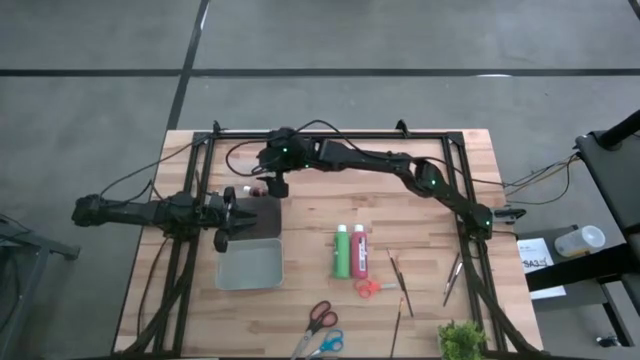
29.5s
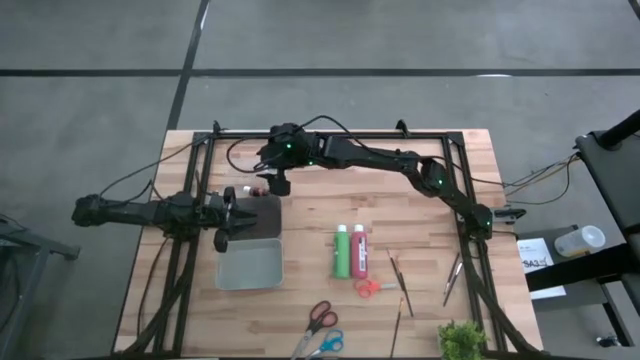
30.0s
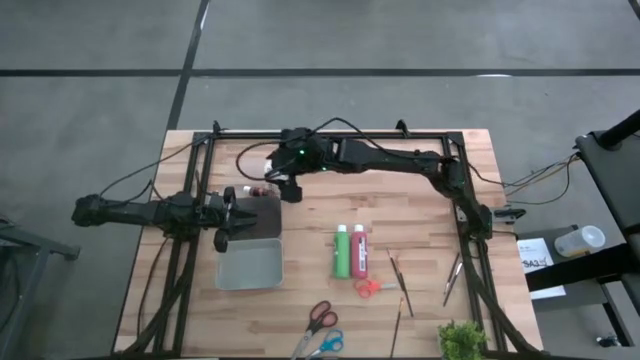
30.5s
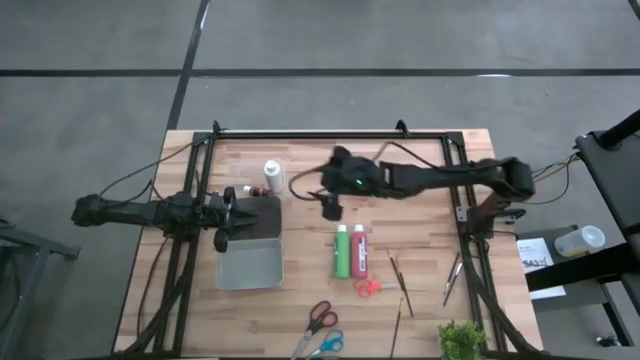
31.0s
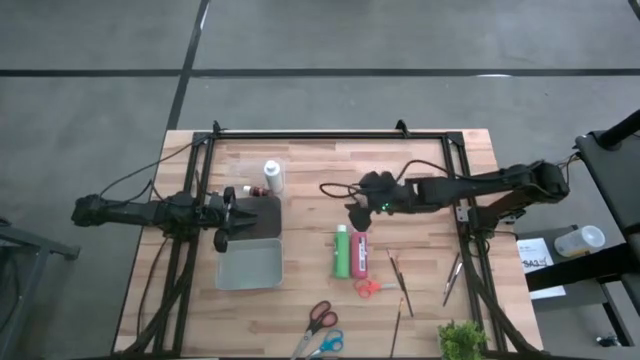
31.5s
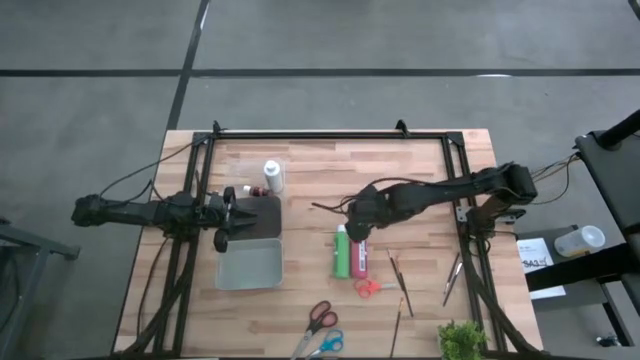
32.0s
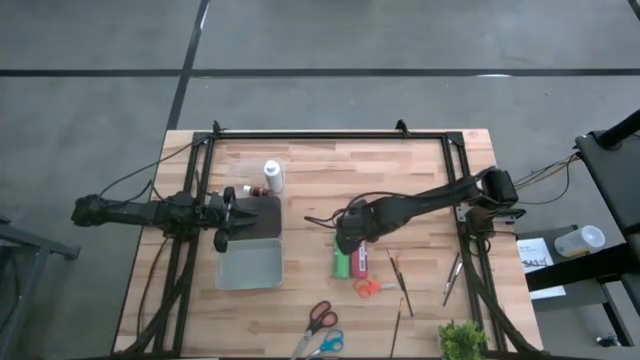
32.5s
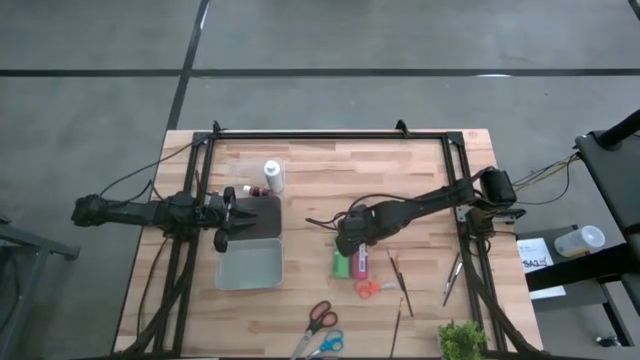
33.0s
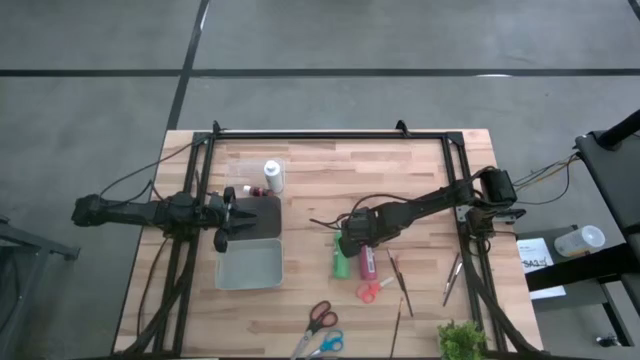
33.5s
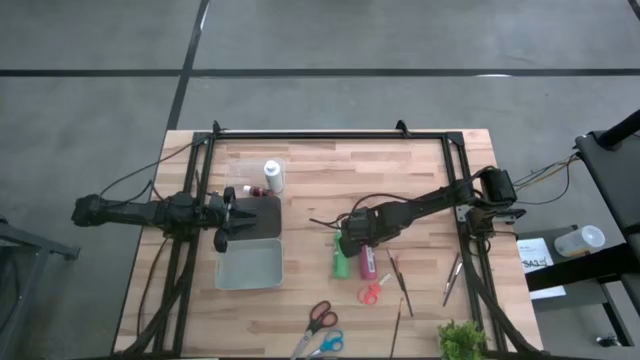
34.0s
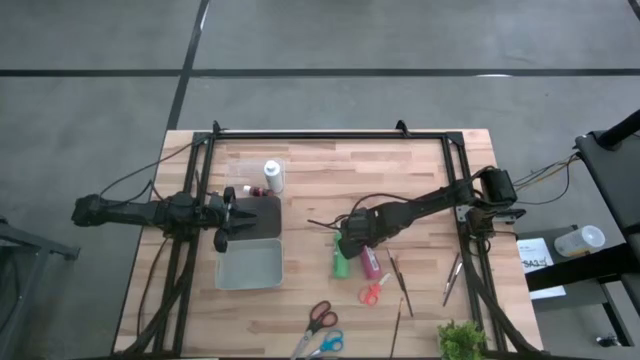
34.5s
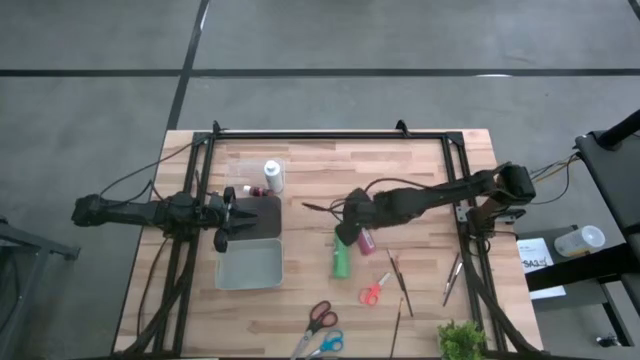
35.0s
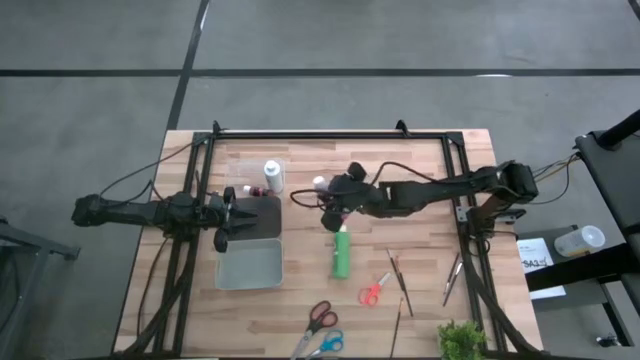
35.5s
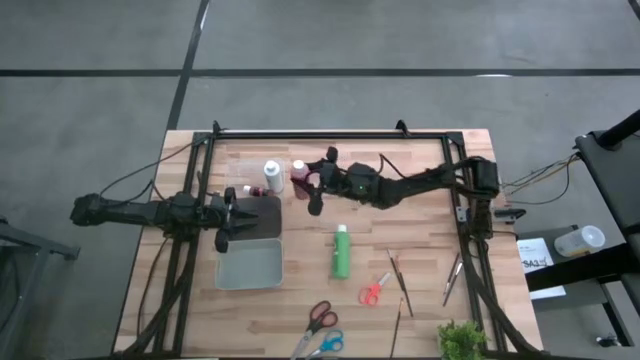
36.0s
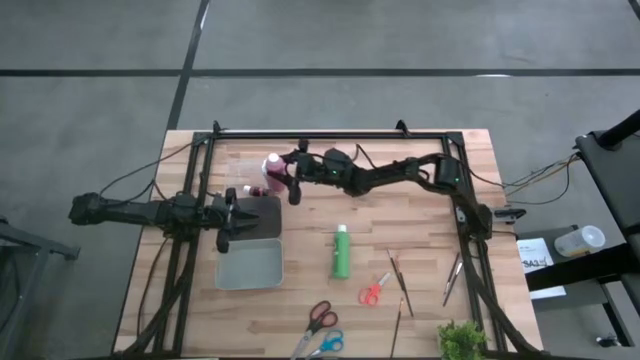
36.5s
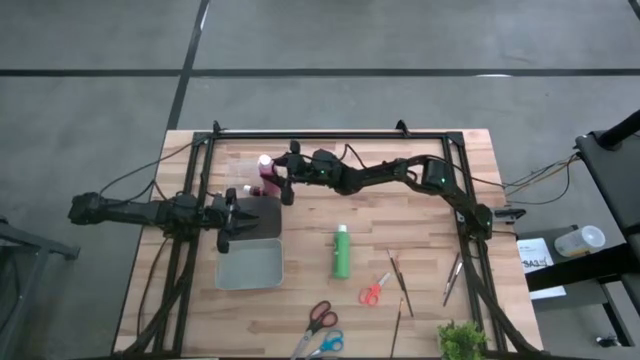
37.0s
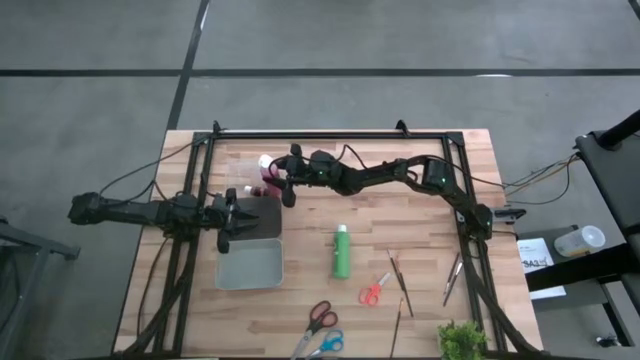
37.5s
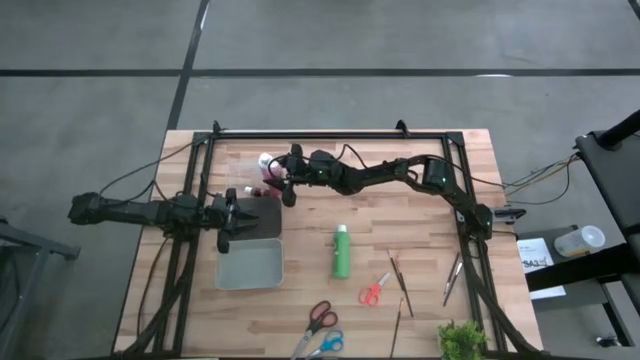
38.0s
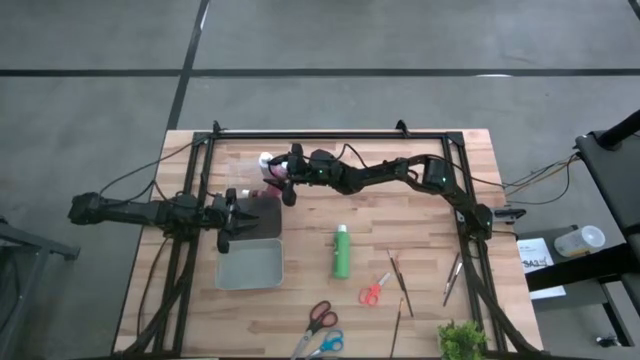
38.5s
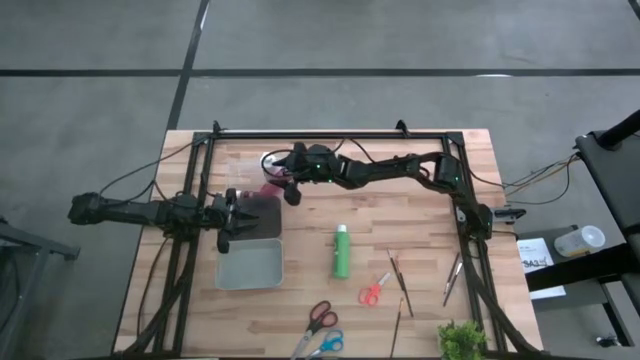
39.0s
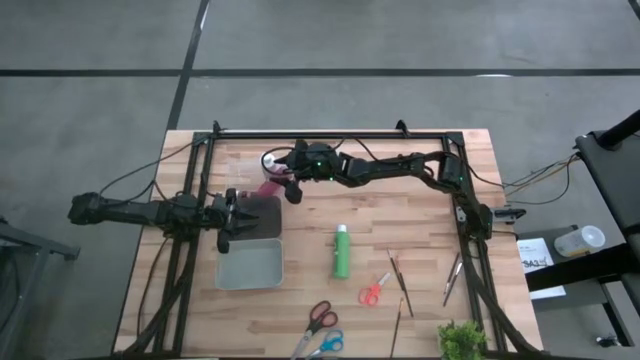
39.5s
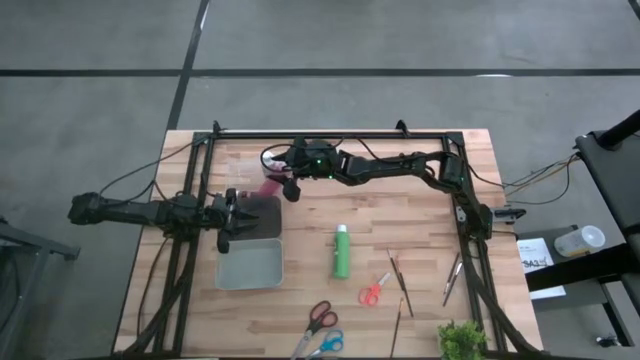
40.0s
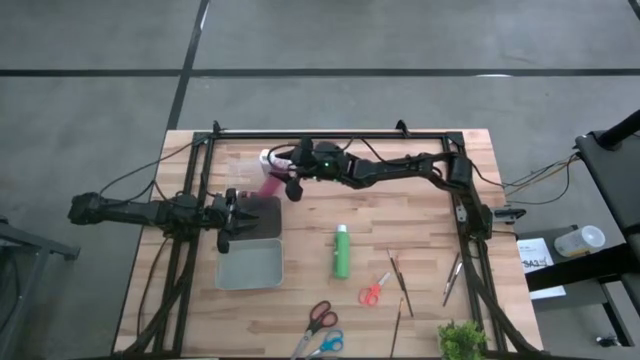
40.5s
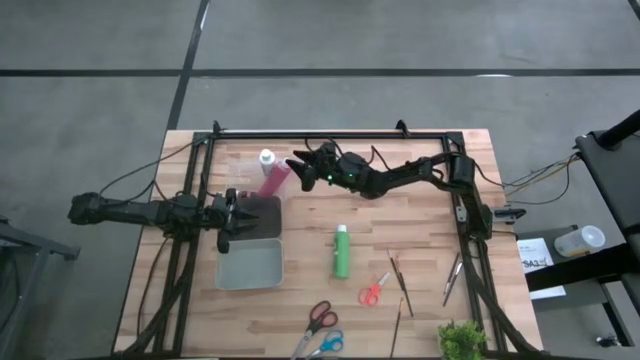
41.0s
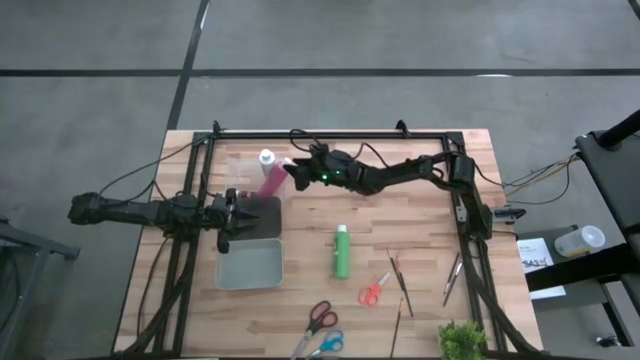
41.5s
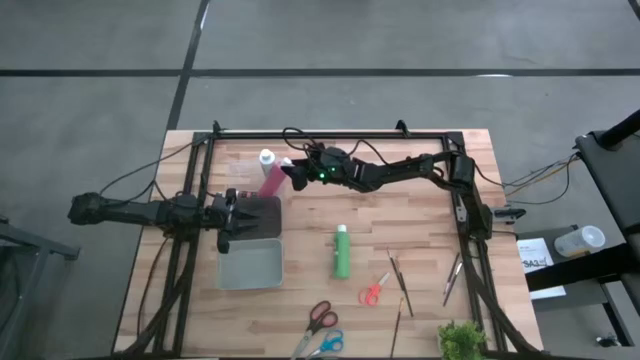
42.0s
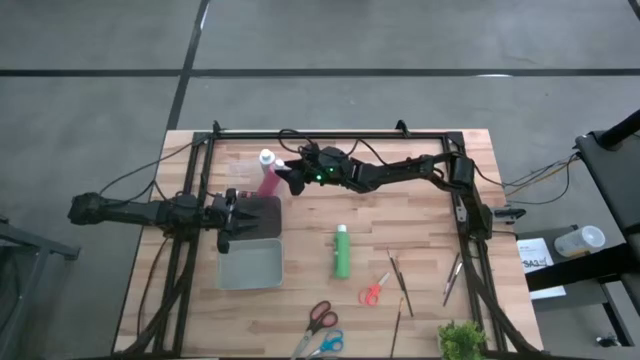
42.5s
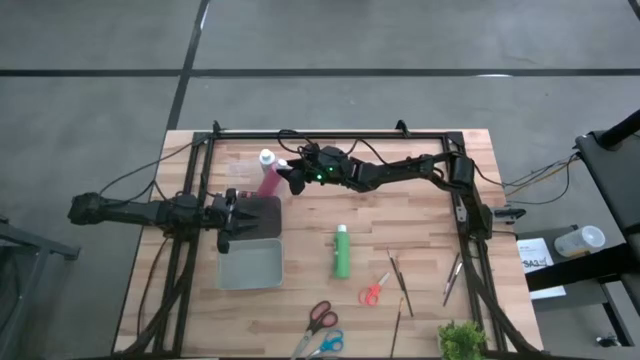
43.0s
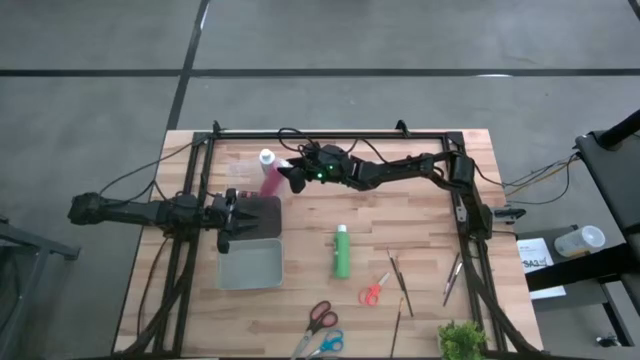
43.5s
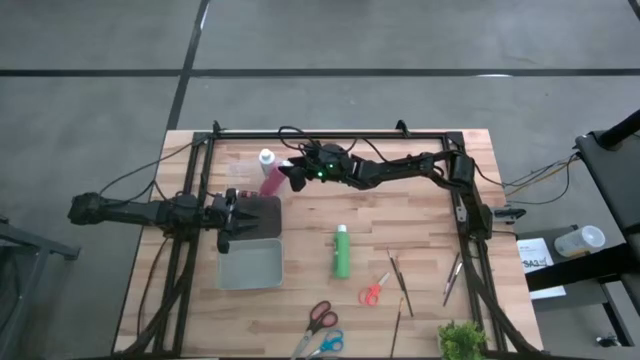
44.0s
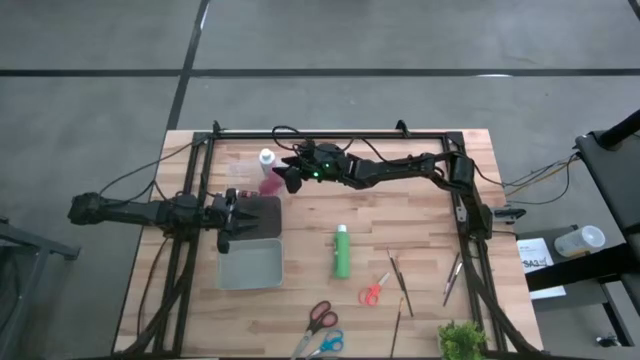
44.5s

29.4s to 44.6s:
Task: Pick & Place Paint Supplies
Put the pink paint bottle into the transparent bin

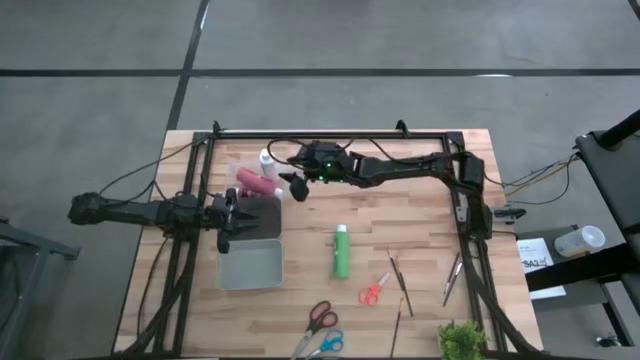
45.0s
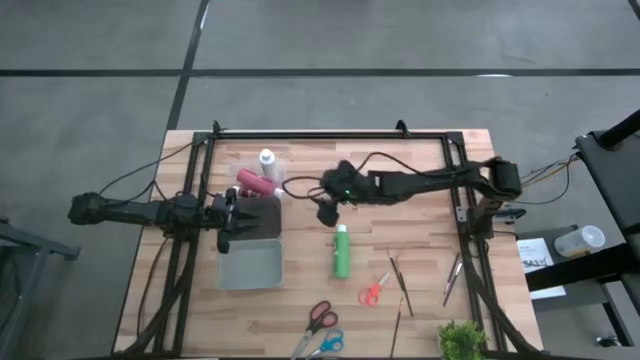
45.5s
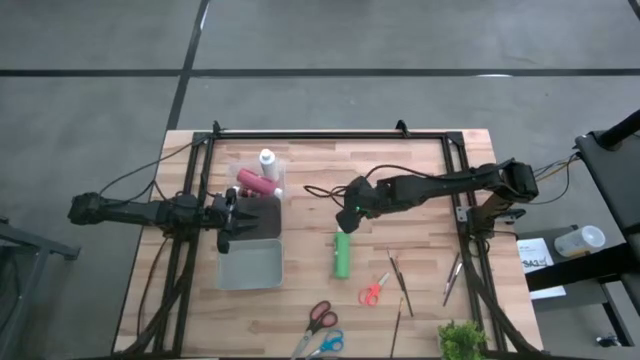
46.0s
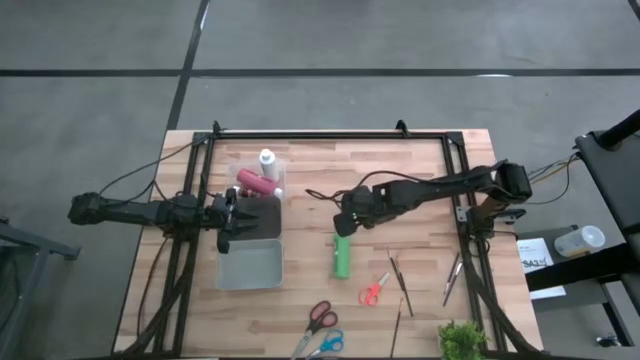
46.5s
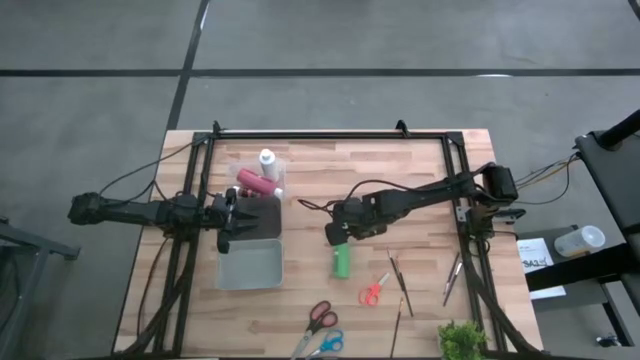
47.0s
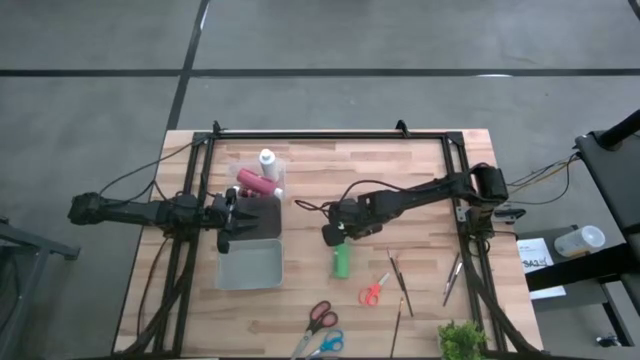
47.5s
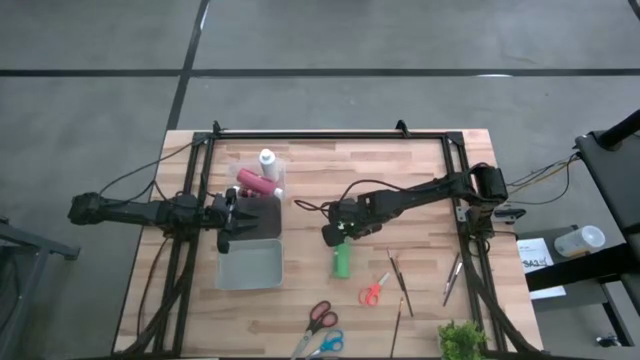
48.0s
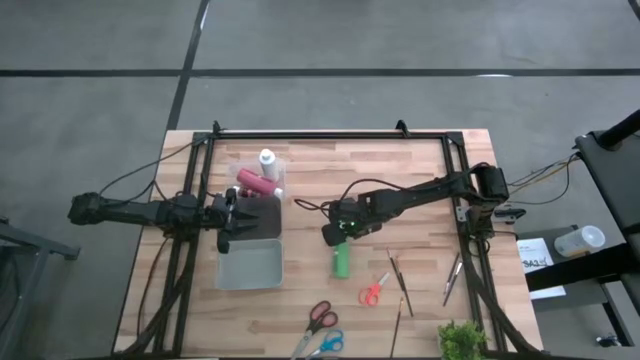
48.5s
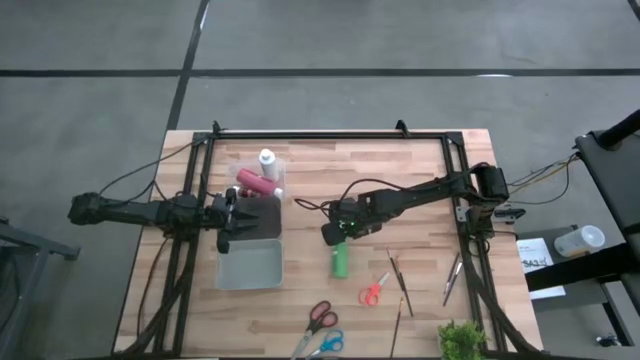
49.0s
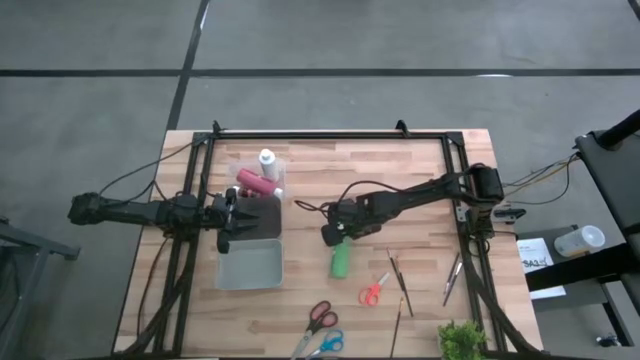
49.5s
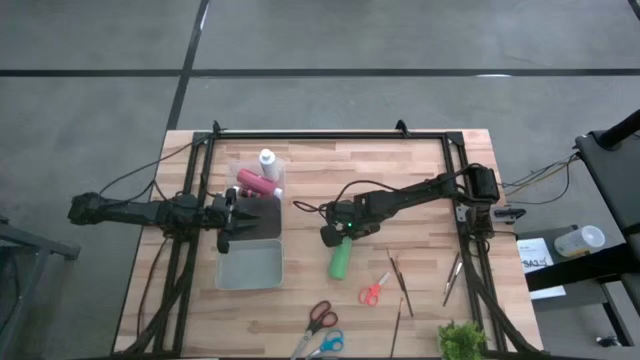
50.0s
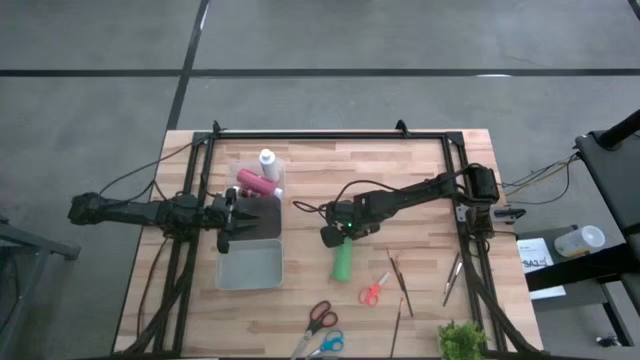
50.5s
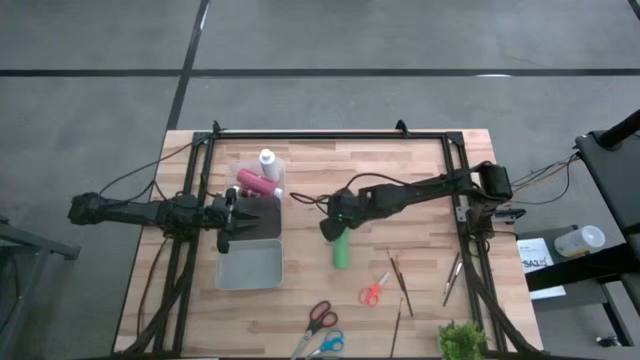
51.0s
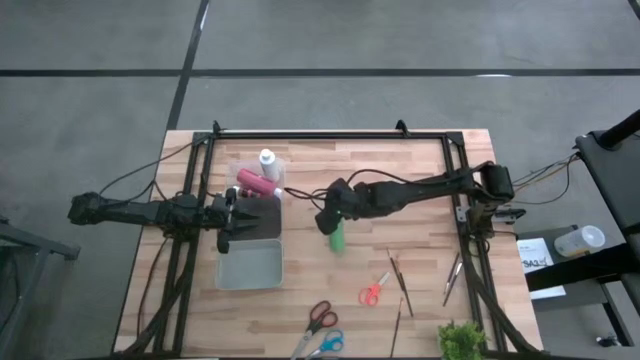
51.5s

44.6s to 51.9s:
Put the green paint bottle into the transparent bin
